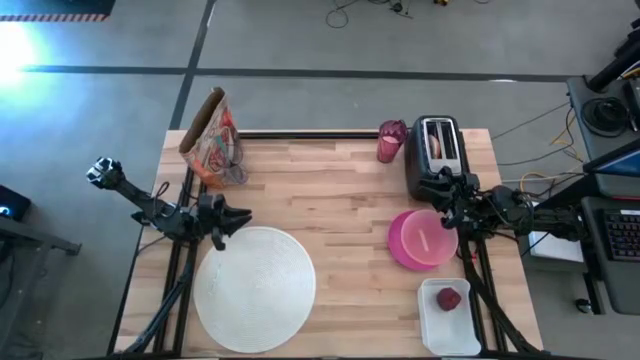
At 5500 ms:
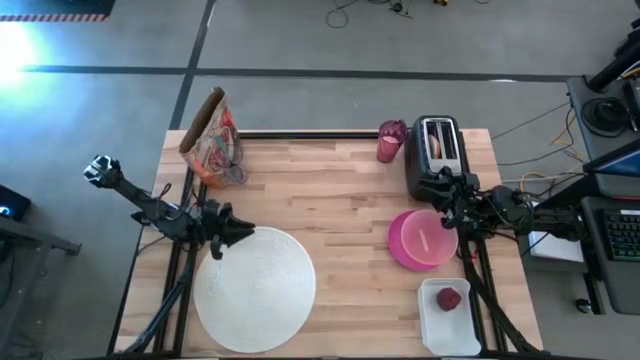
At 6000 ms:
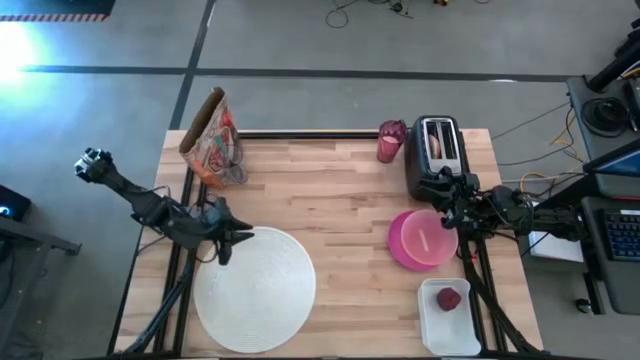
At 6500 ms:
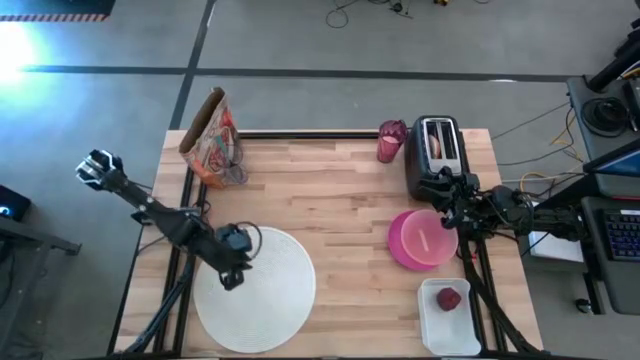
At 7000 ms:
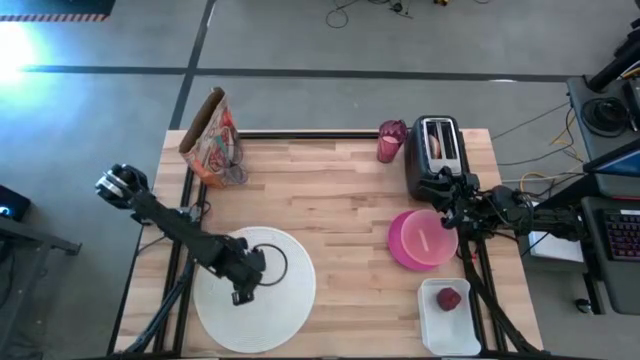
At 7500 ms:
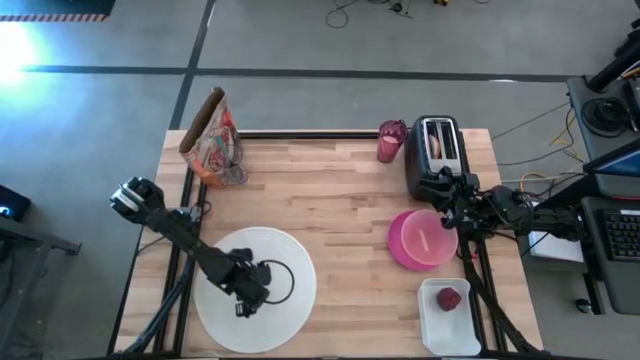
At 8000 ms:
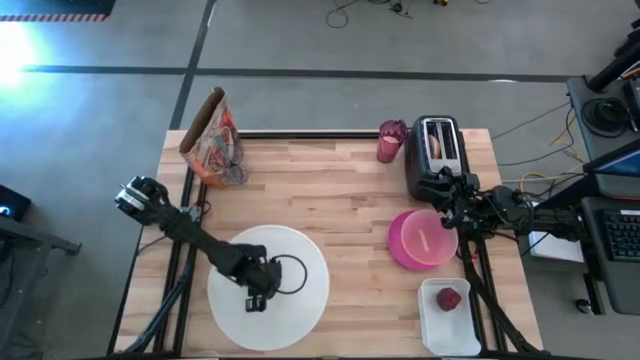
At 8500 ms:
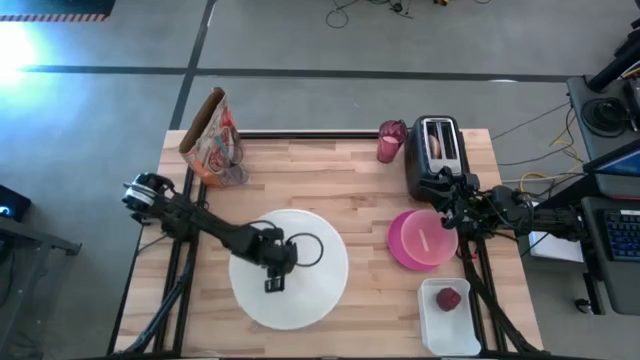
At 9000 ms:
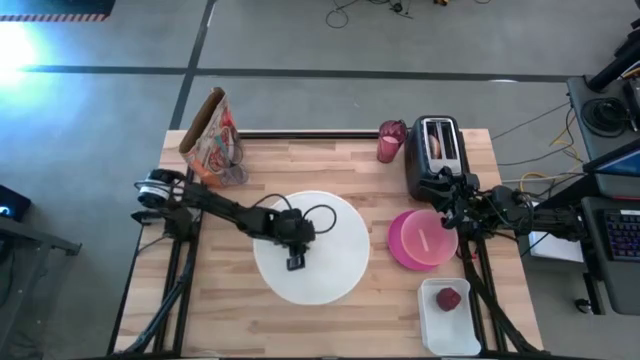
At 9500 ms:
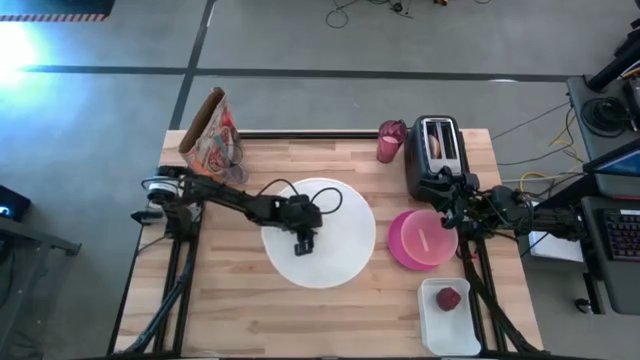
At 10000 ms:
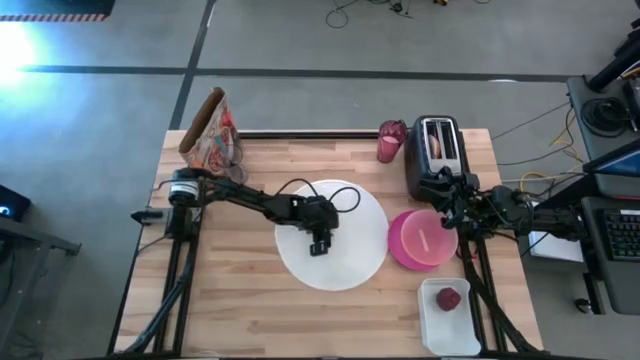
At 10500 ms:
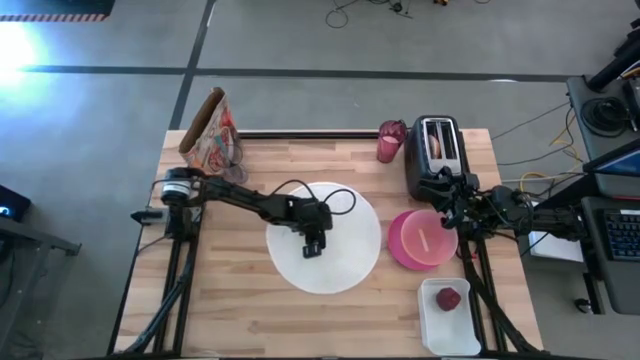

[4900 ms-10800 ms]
Task: Arrange a breakfast setting
Move the white table mat to the center of the table

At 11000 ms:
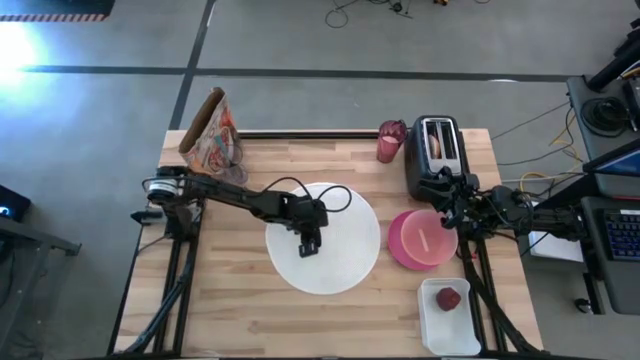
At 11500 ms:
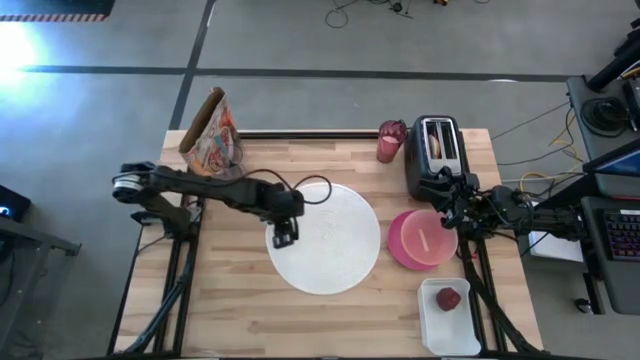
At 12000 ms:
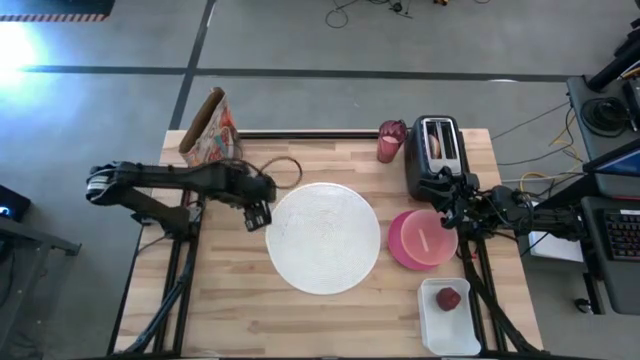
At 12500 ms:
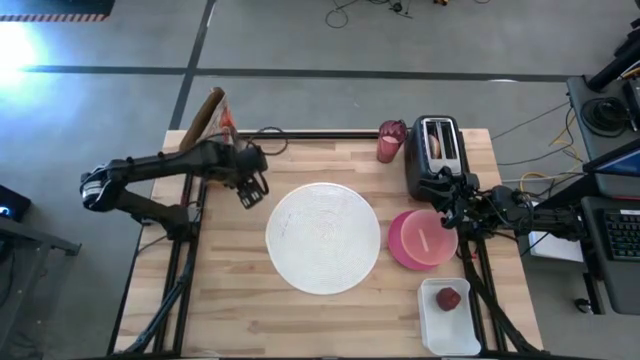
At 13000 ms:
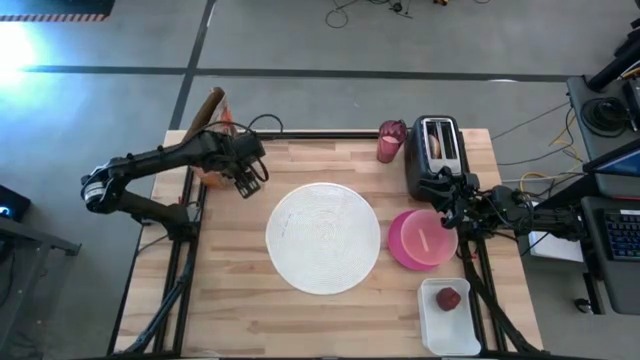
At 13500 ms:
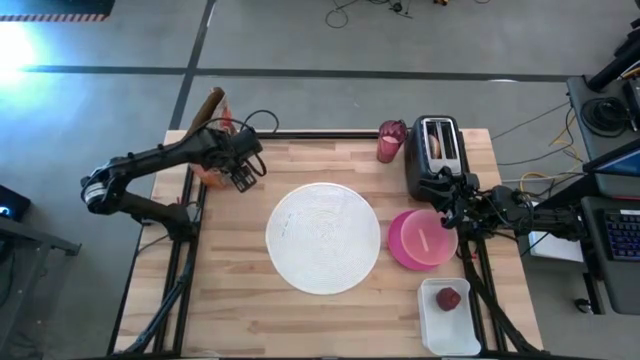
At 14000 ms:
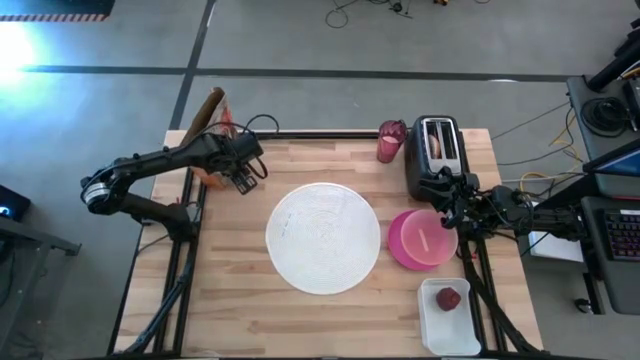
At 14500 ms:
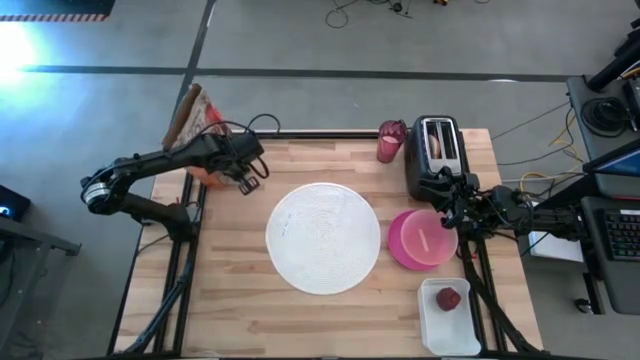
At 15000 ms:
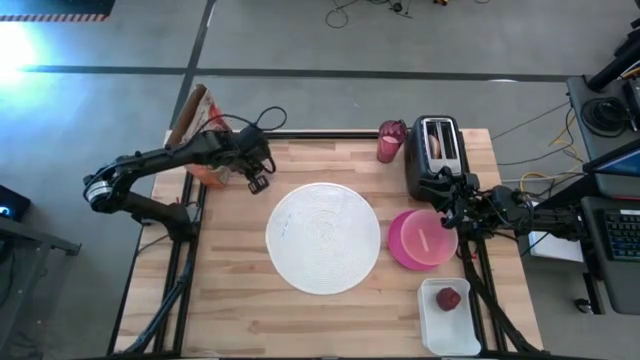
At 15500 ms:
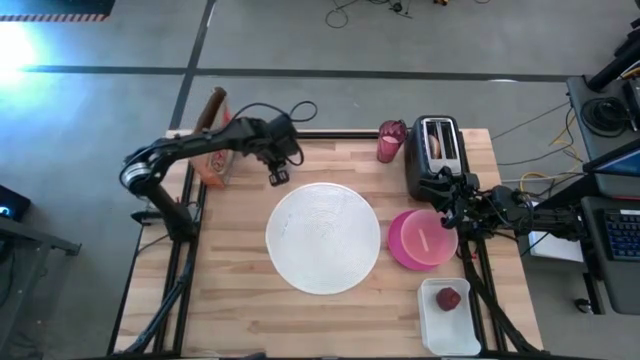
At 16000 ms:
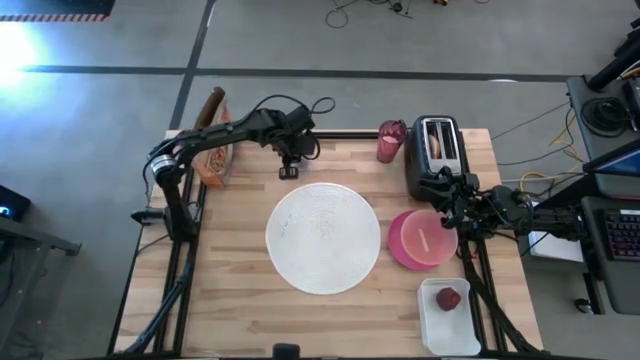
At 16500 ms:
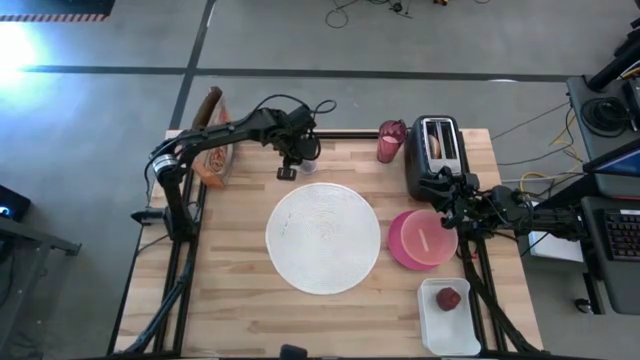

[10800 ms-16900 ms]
Move the transparent cup with the spoon to the top of the placemat

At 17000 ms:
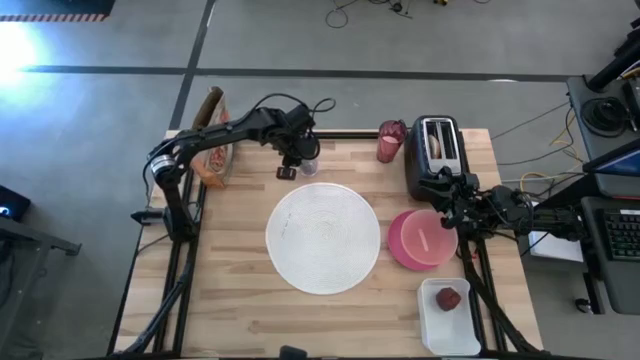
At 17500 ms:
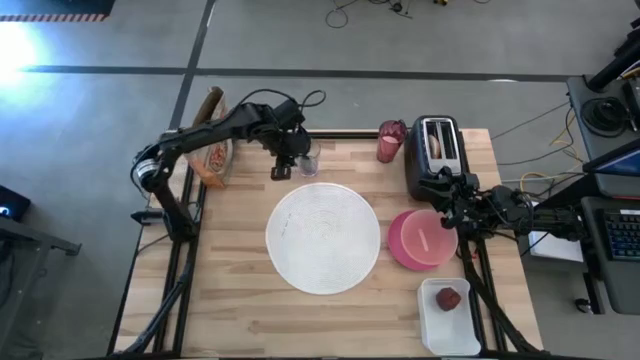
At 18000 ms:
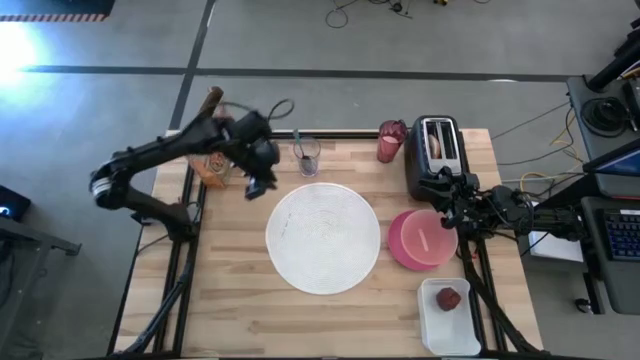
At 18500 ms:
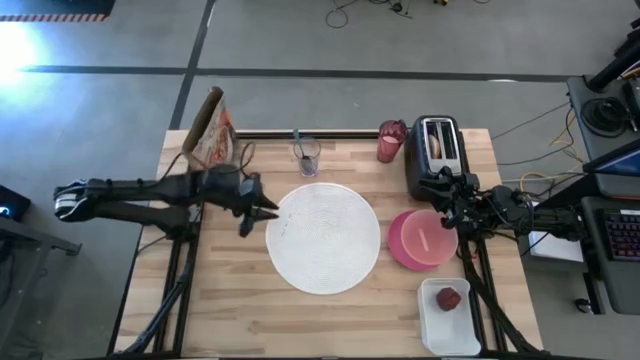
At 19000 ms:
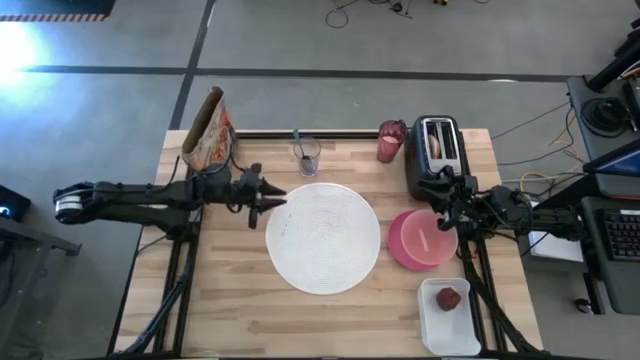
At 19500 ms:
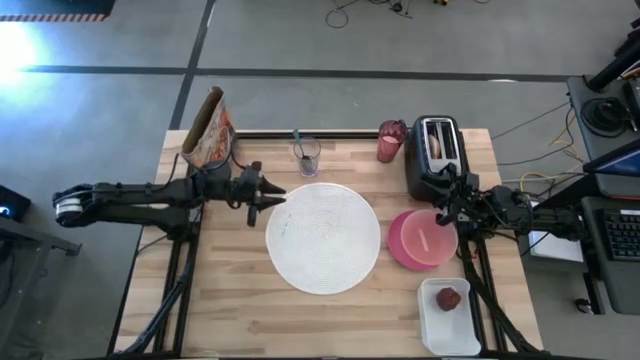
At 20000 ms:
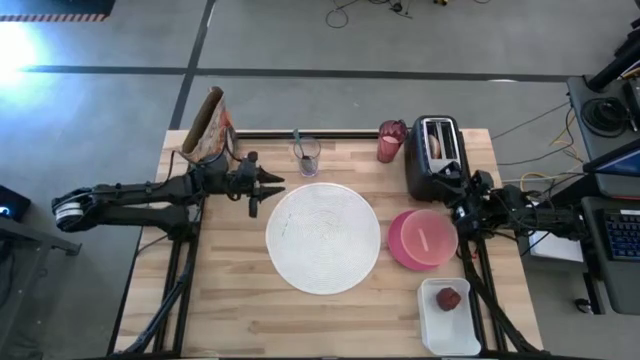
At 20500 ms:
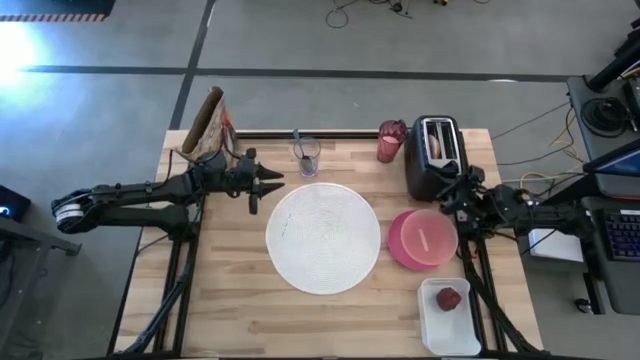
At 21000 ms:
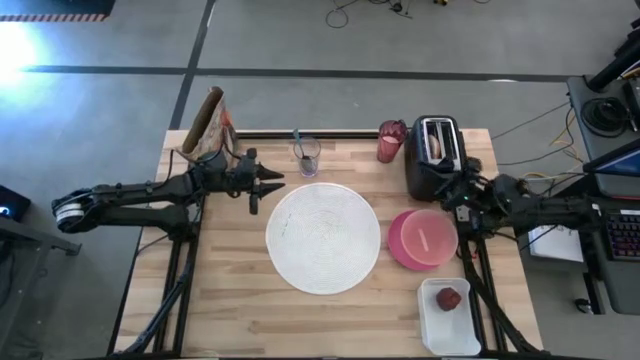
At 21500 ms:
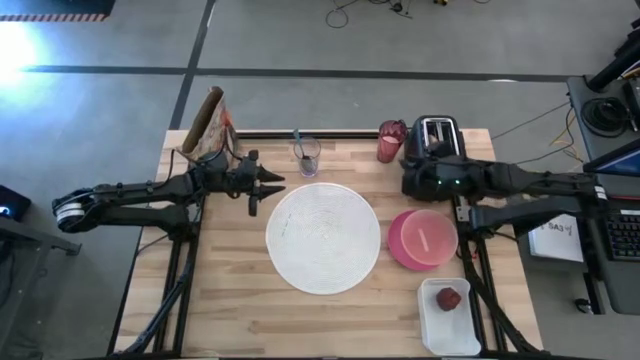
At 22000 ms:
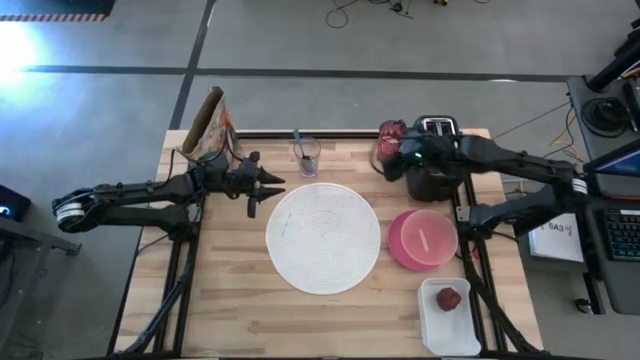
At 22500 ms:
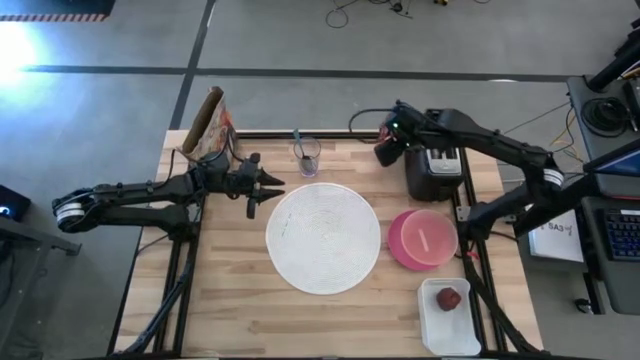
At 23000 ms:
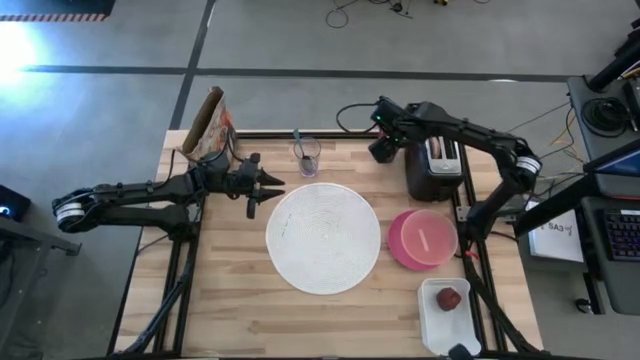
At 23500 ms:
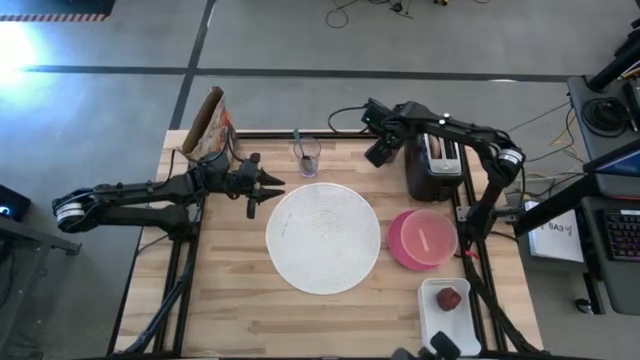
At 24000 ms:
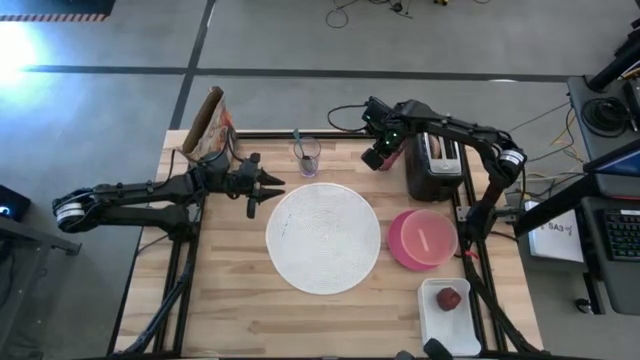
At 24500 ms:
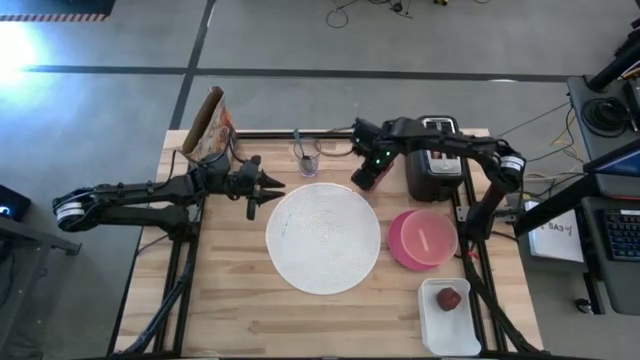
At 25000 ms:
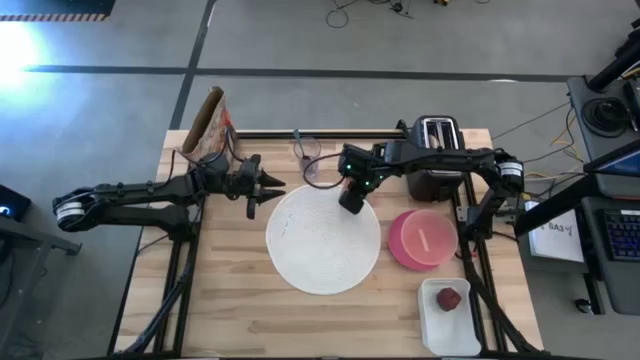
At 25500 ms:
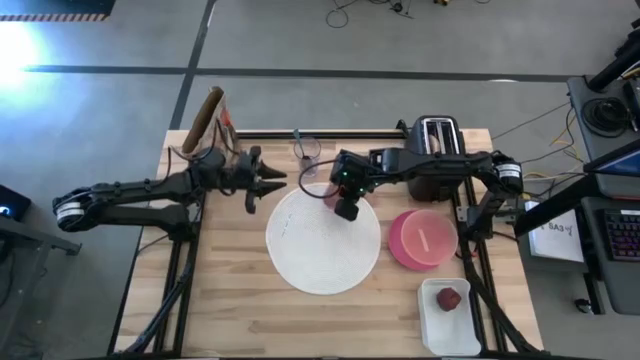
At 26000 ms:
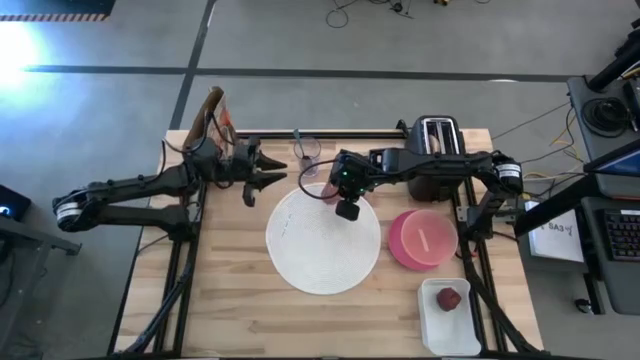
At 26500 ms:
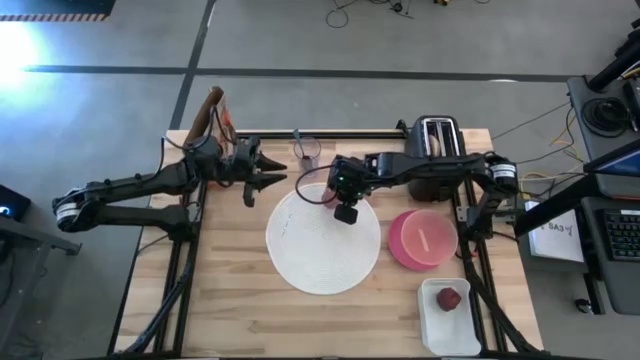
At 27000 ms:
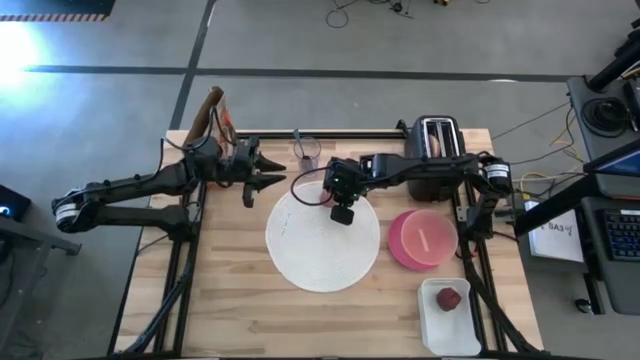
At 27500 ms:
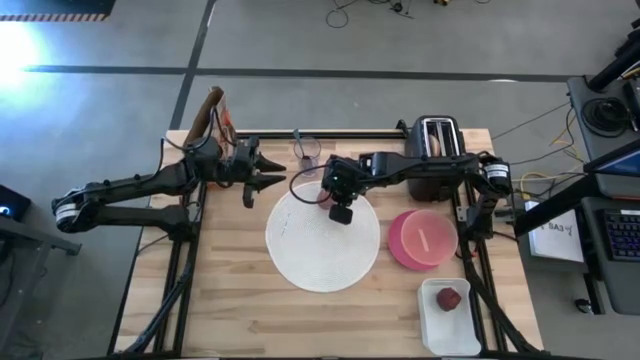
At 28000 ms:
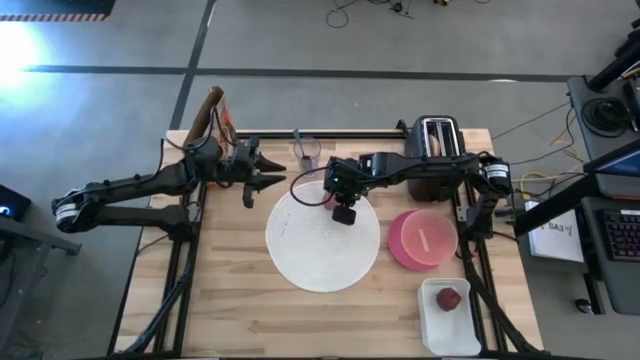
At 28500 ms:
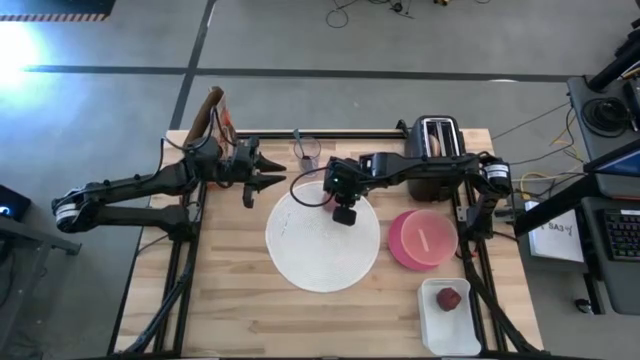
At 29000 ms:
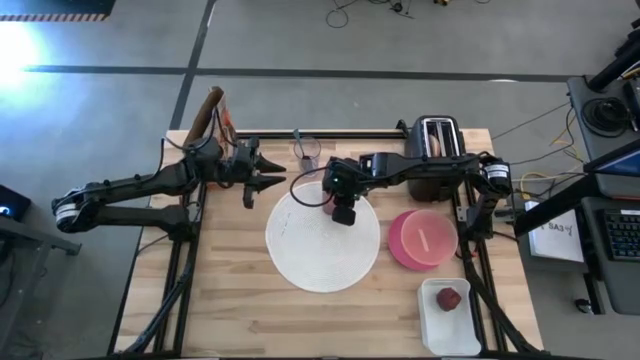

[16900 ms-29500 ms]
Put the red cup of milk on top of the white table mat
